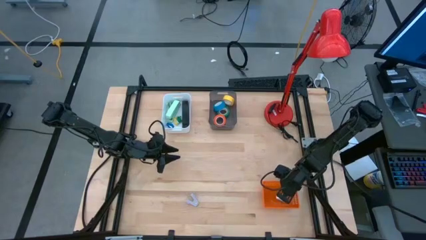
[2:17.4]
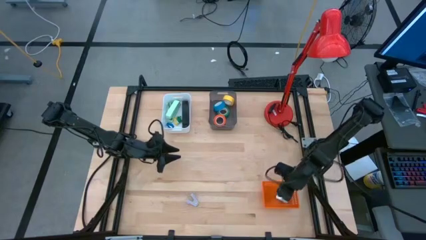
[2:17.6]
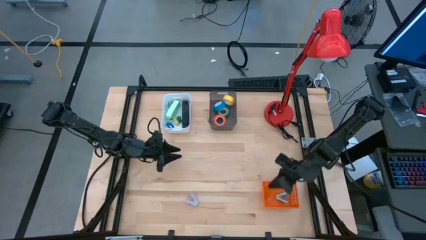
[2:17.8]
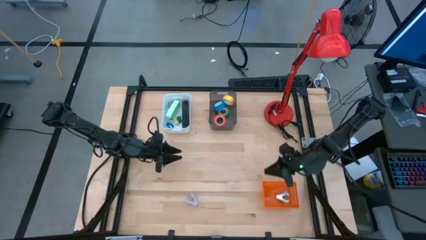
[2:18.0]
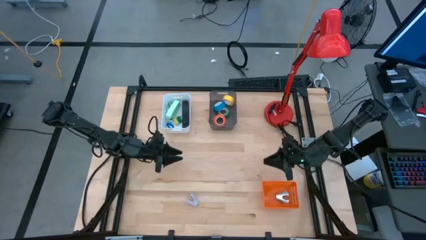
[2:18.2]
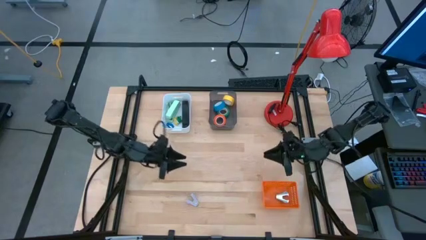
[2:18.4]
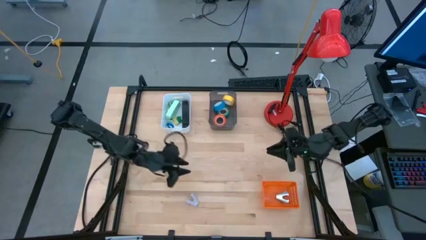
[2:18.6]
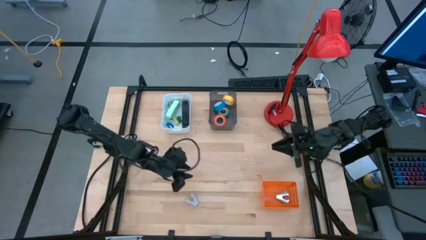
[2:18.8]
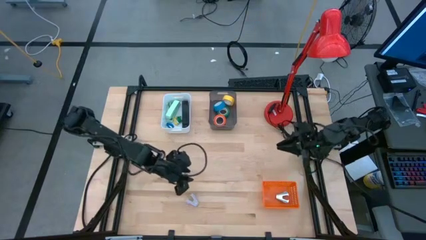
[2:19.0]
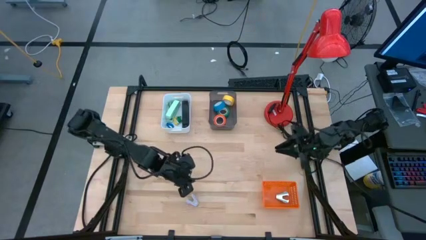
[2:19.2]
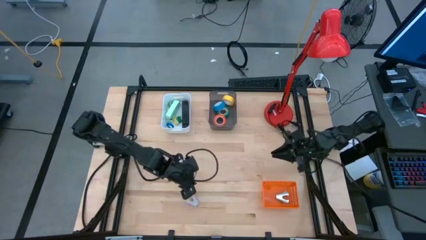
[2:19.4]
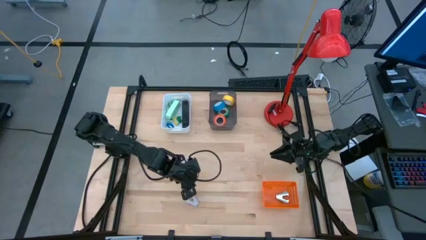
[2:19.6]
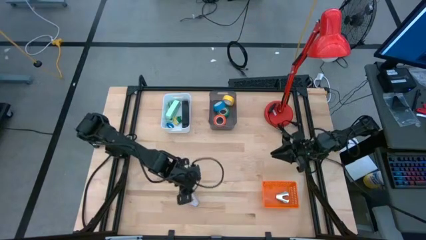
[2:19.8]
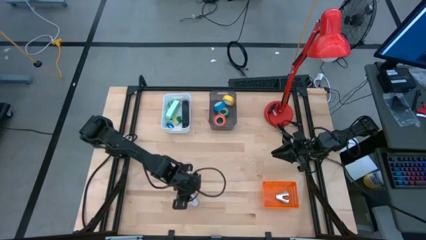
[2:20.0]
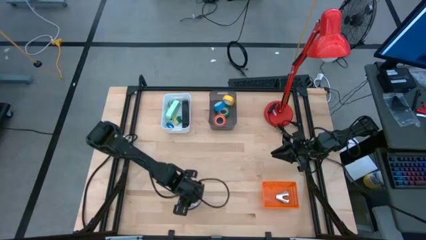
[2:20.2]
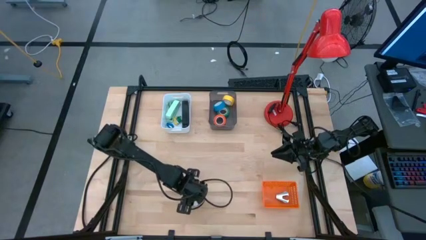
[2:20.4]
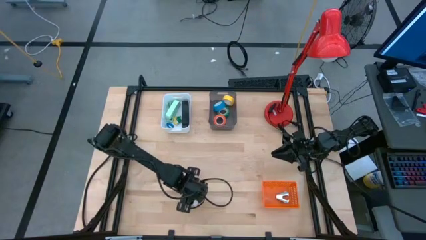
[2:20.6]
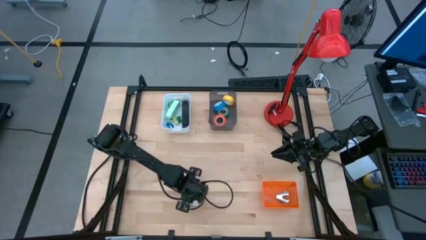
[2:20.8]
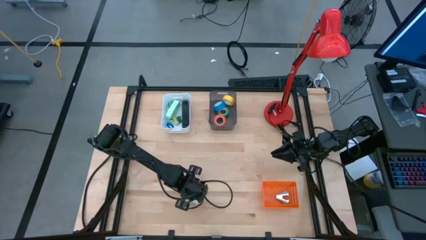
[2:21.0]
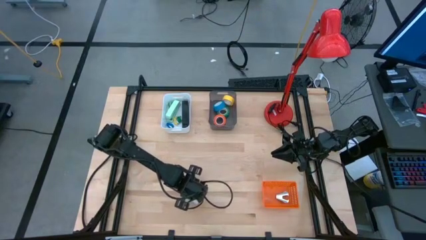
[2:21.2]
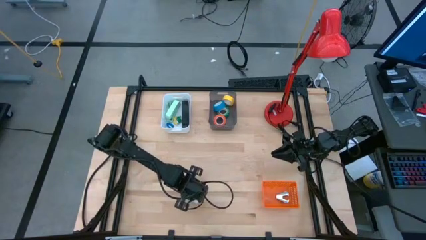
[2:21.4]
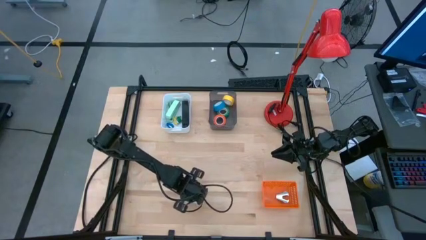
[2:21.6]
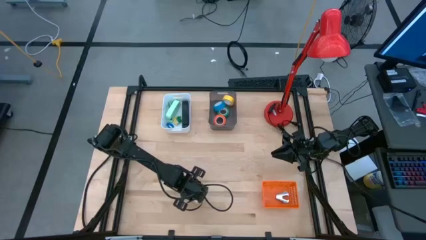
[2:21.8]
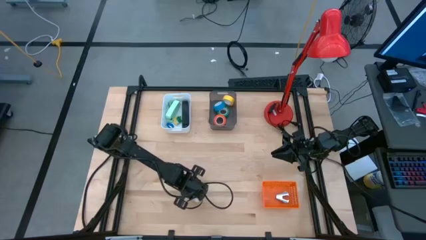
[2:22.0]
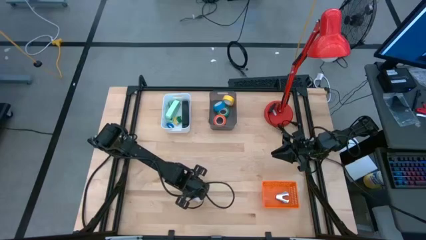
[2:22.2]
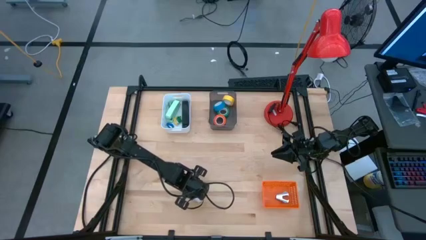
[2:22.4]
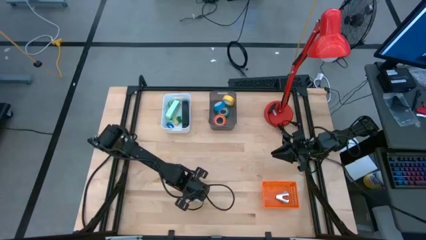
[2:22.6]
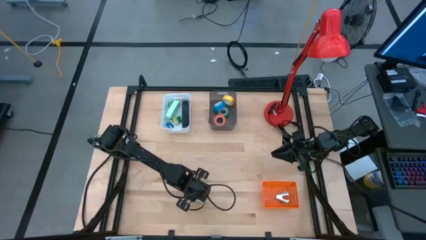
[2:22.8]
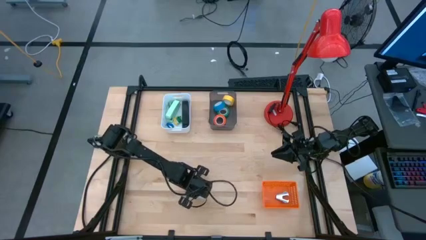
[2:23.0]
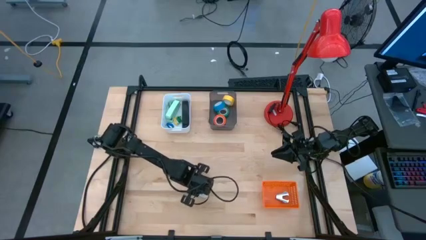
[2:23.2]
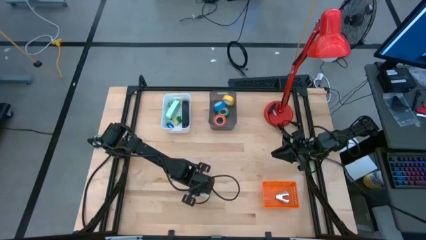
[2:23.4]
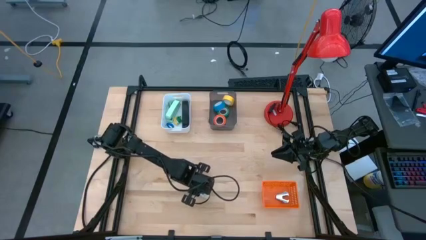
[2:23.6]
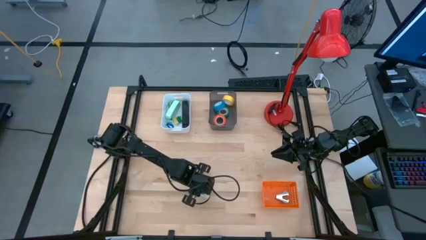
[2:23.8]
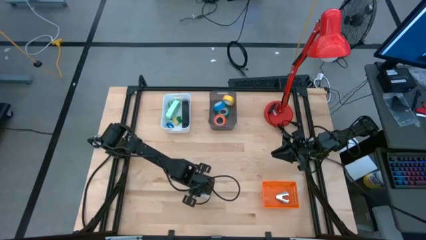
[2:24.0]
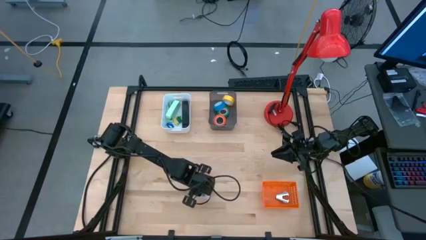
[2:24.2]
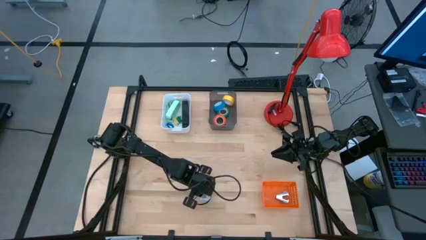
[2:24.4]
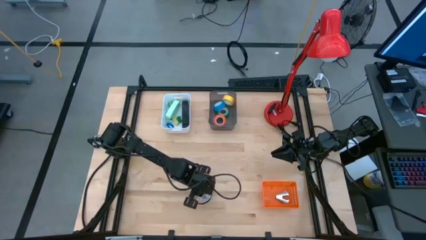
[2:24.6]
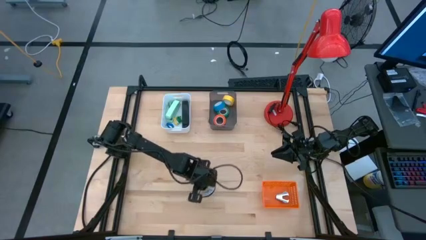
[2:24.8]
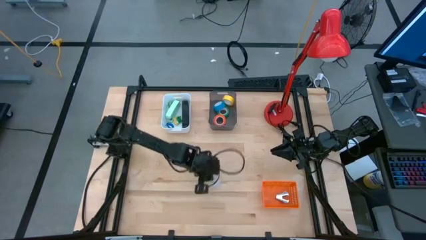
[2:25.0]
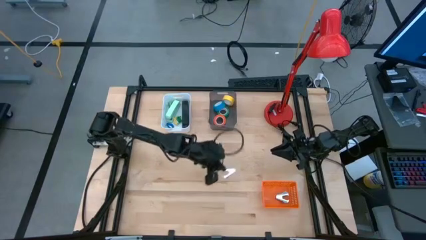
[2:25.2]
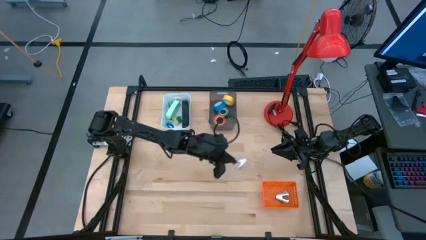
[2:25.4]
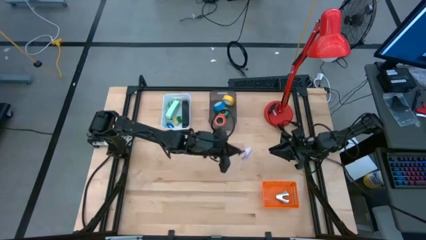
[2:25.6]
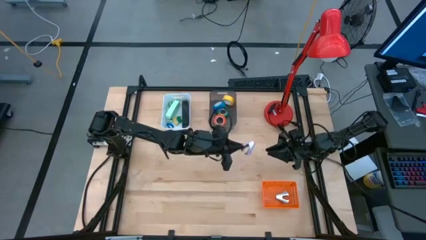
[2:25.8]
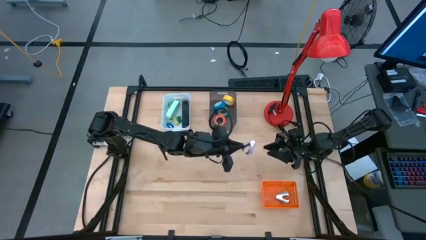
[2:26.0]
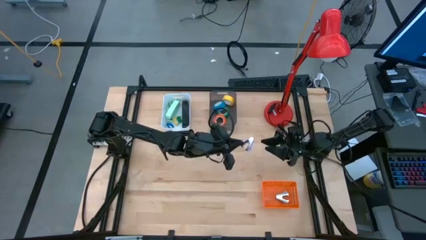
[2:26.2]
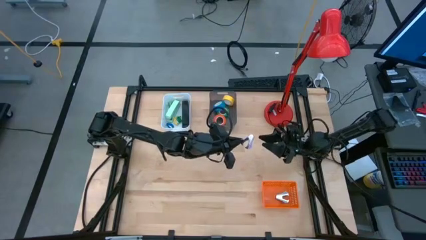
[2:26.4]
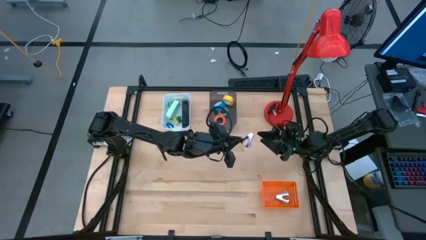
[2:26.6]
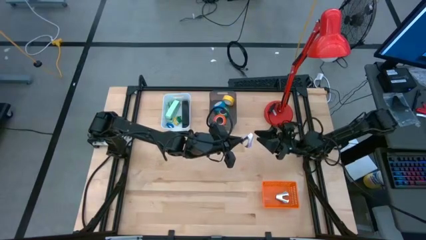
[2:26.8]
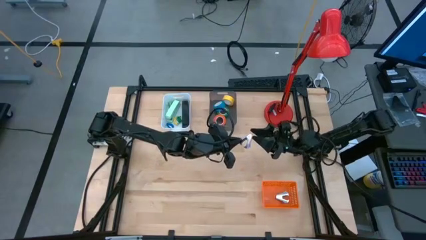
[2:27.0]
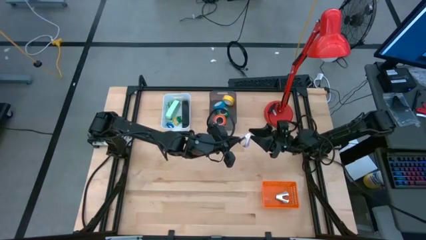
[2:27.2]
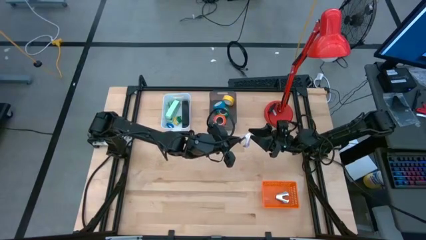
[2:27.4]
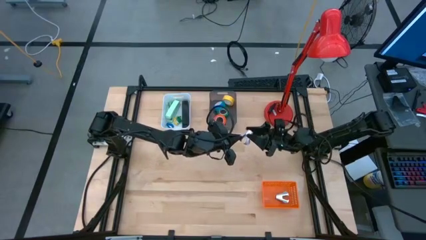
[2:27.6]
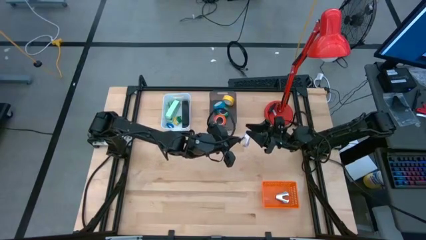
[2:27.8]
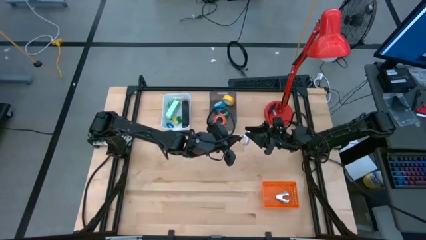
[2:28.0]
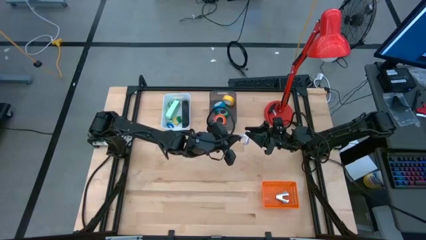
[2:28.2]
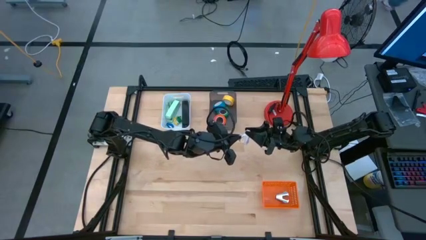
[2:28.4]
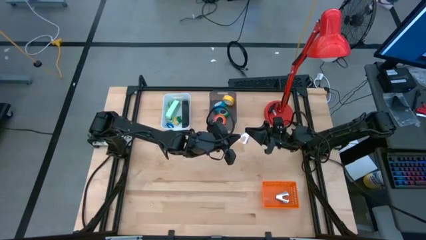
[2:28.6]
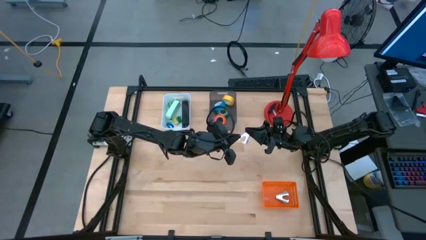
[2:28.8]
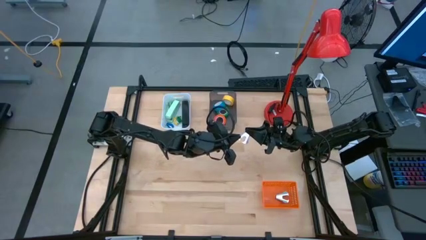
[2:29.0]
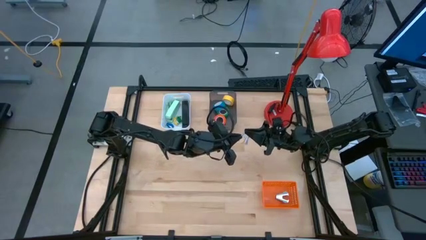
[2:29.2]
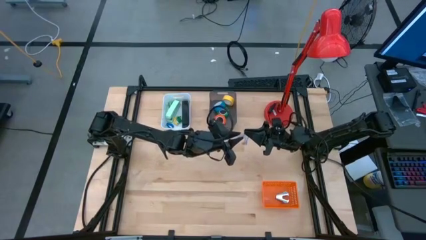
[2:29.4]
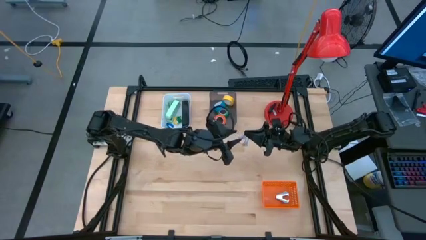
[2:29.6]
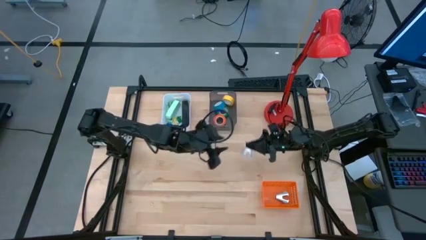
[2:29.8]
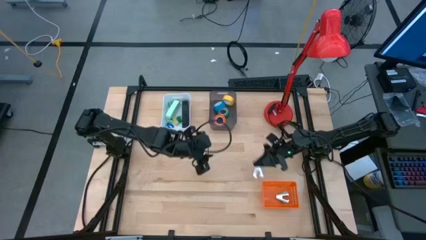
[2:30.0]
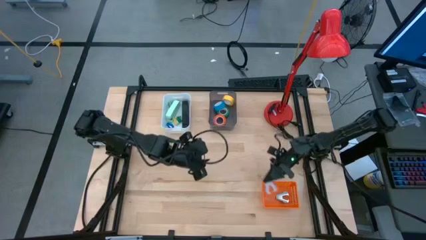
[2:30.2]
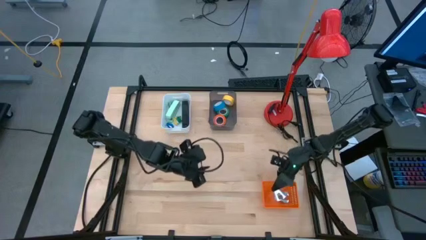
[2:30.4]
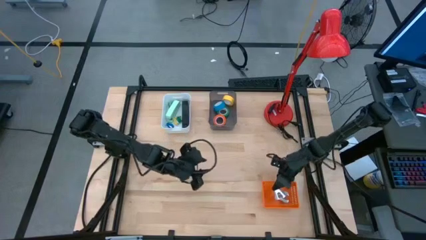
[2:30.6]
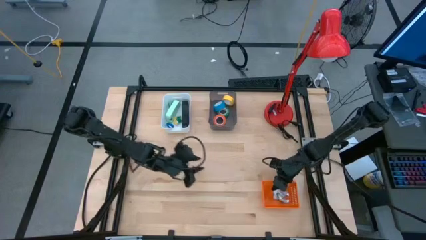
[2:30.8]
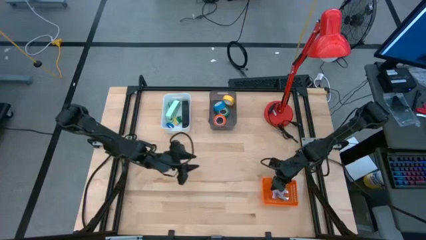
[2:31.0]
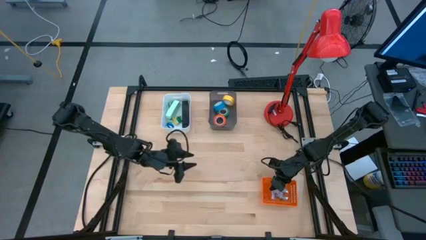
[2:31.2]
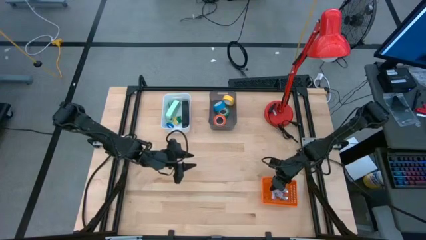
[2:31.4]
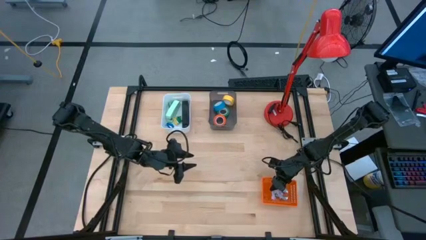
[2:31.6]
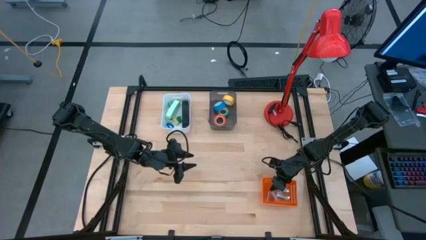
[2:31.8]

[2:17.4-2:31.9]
Task: Pick and place Stapler, Stapler remover, tape
Put the violet staple remover into the orange bin

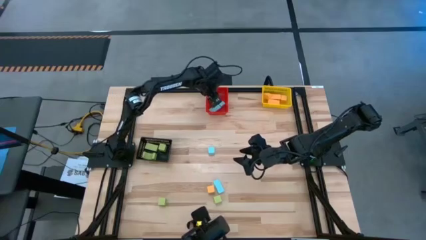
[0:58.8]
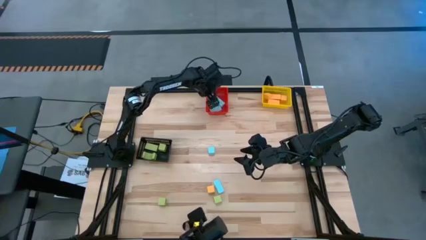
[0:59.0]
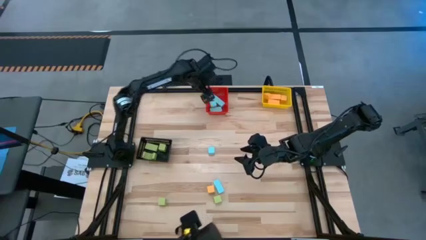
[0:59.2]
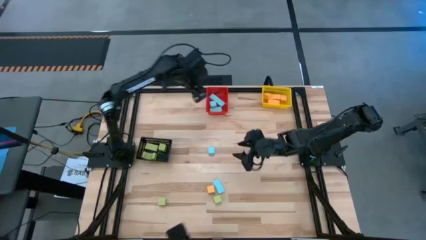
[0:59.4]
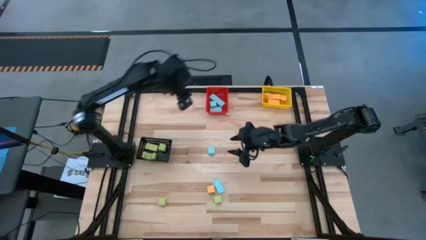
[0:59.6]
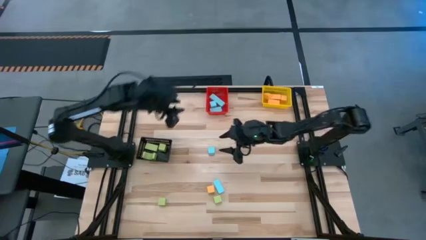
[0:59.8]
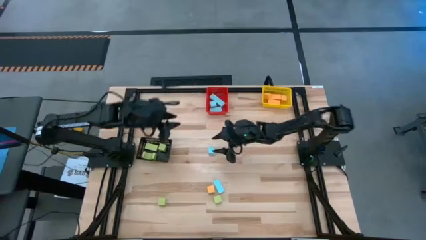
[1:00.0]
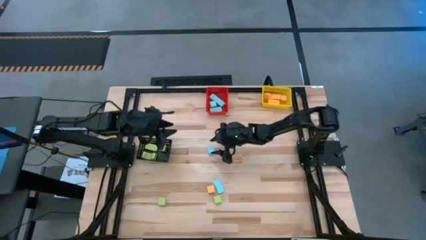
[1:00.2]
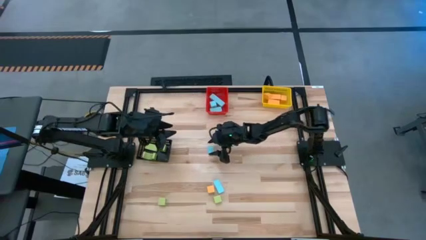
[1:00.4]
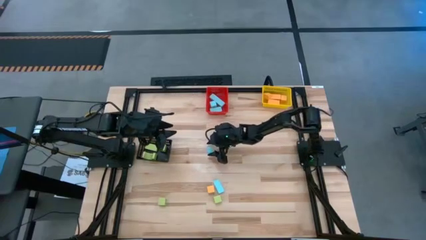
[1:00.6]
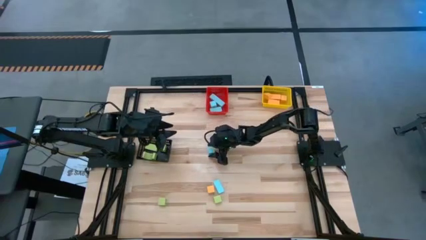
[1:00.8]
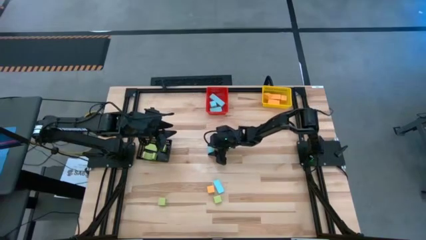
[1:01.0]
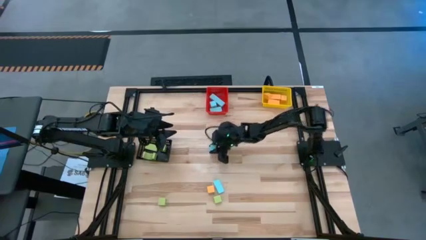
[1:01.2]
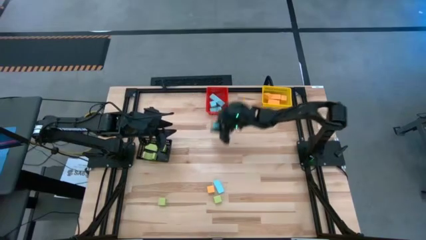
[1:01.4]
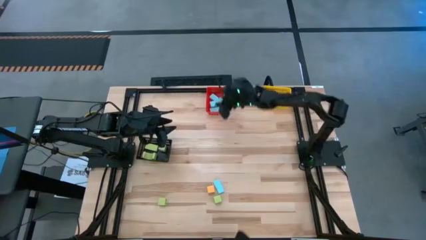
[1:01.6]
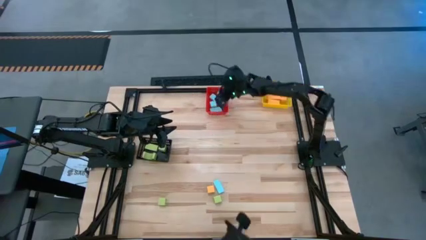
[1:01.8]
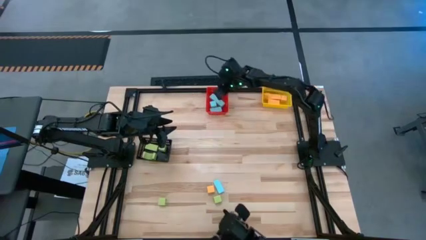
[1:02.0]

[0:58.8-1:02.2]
Task: Sort & place blocks by color
Put the blue block into the red bin
